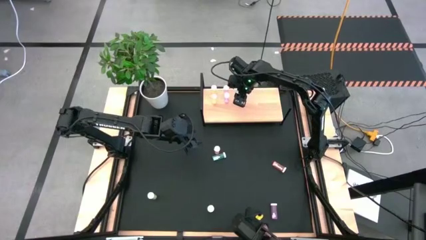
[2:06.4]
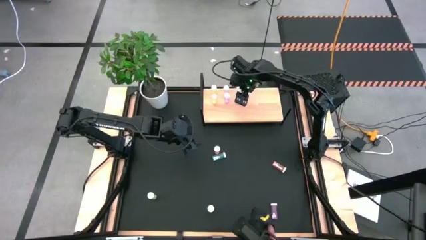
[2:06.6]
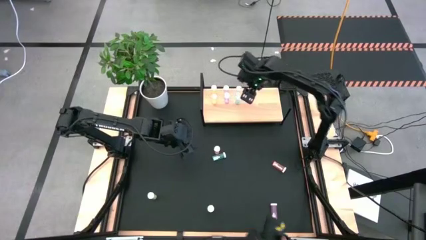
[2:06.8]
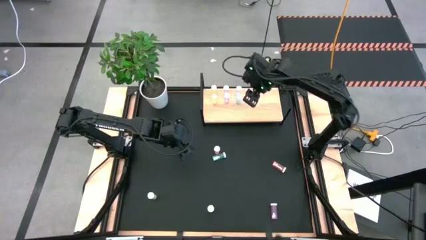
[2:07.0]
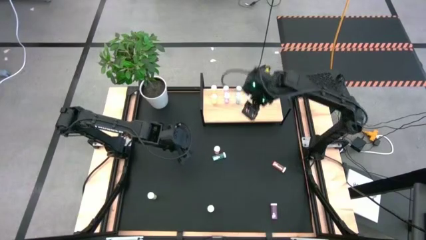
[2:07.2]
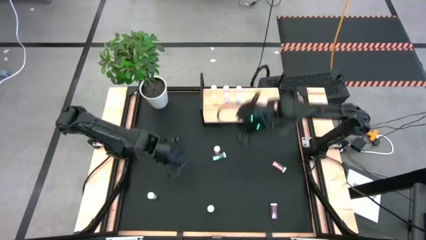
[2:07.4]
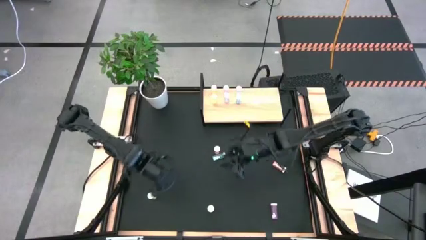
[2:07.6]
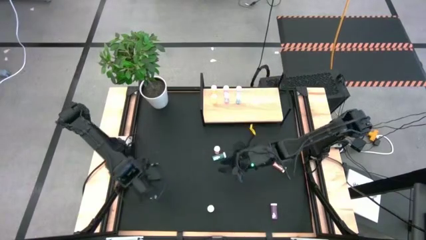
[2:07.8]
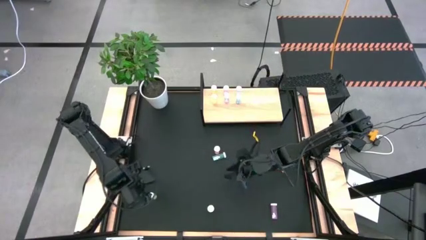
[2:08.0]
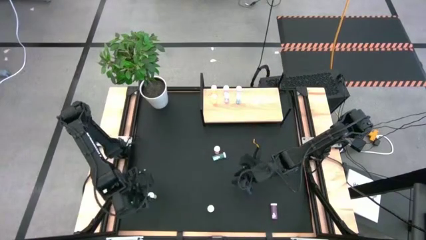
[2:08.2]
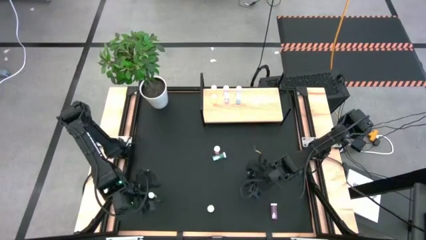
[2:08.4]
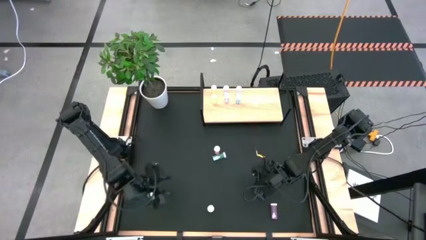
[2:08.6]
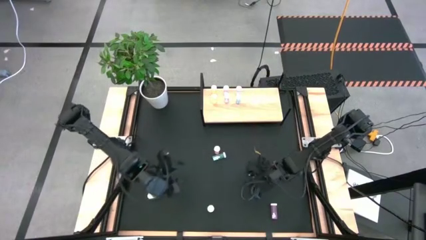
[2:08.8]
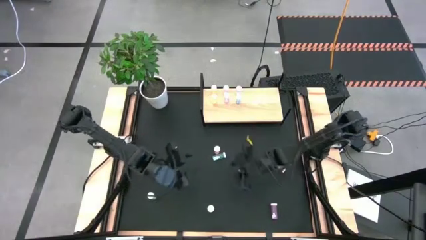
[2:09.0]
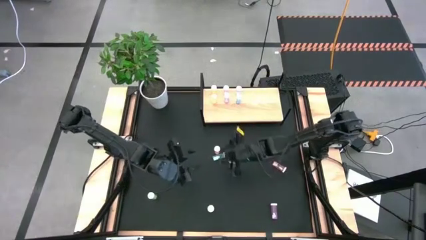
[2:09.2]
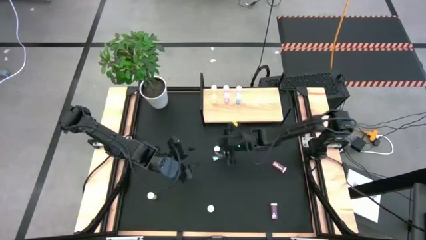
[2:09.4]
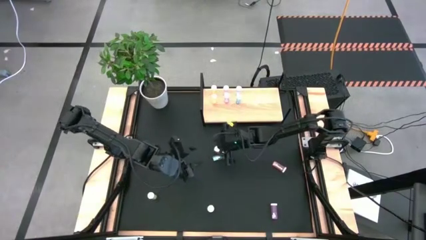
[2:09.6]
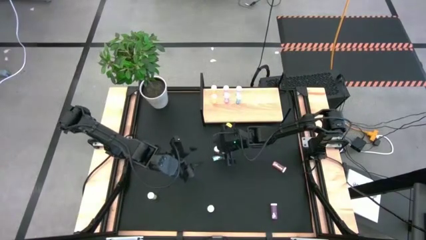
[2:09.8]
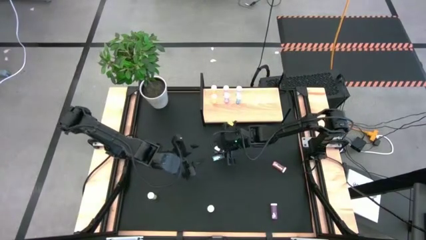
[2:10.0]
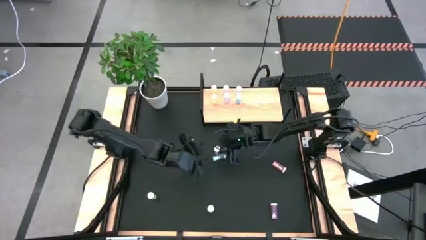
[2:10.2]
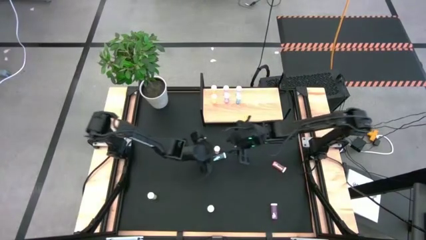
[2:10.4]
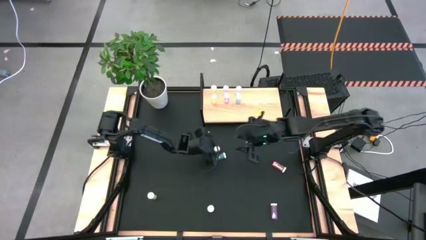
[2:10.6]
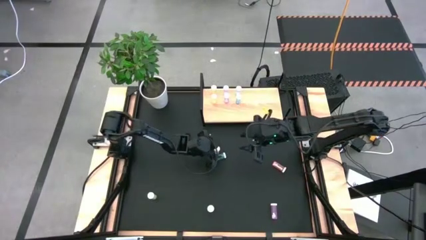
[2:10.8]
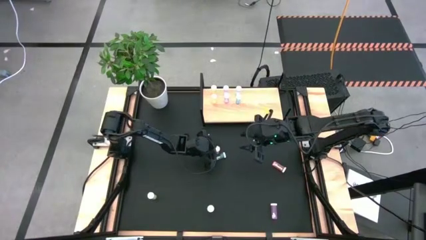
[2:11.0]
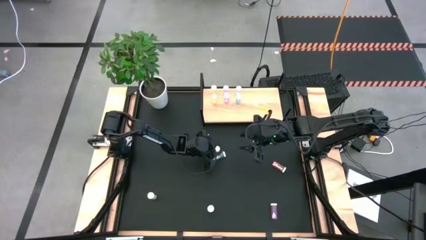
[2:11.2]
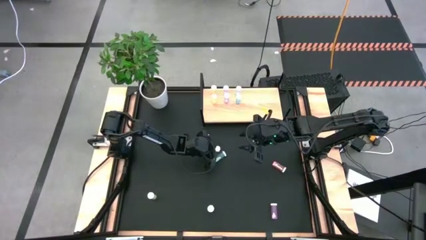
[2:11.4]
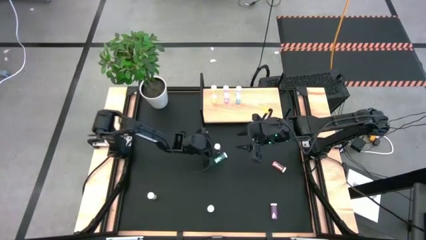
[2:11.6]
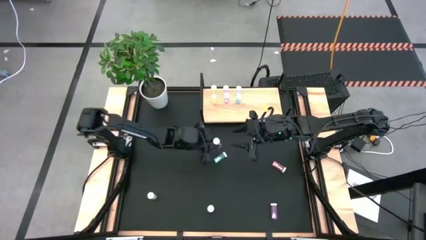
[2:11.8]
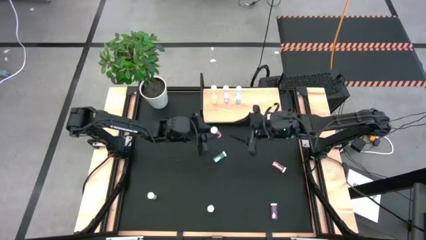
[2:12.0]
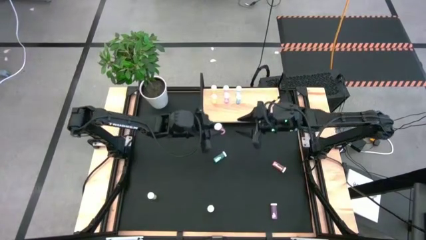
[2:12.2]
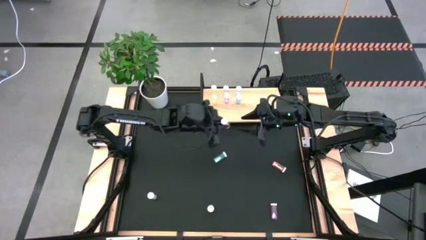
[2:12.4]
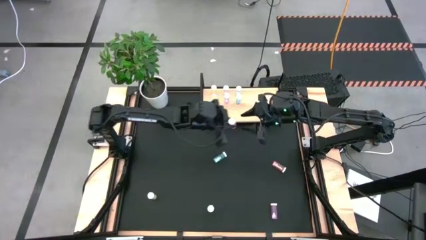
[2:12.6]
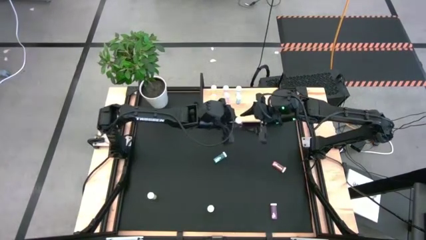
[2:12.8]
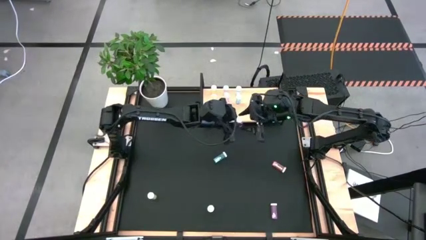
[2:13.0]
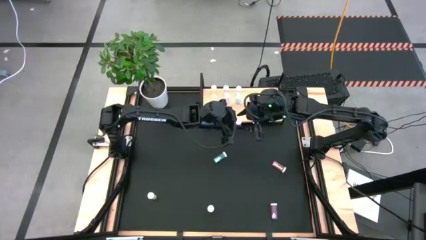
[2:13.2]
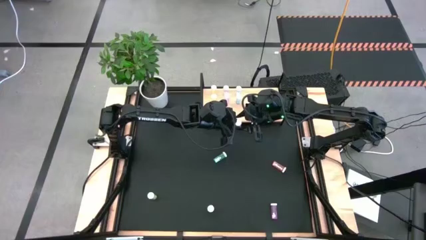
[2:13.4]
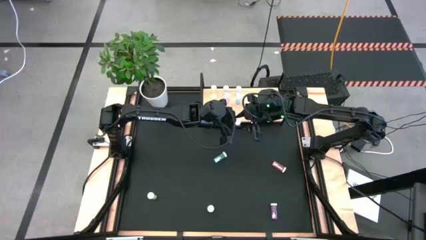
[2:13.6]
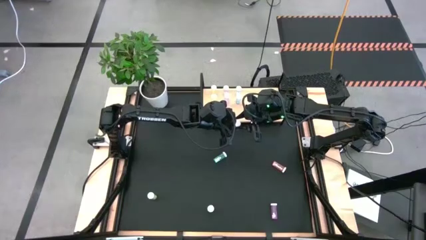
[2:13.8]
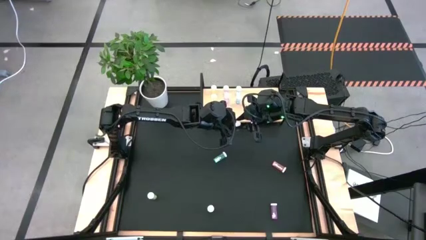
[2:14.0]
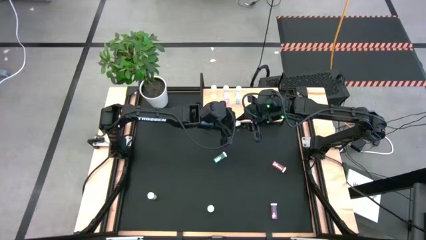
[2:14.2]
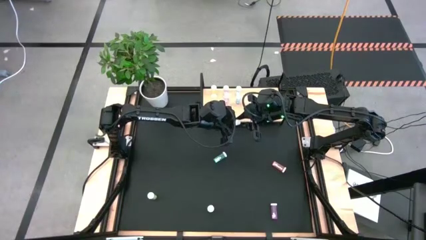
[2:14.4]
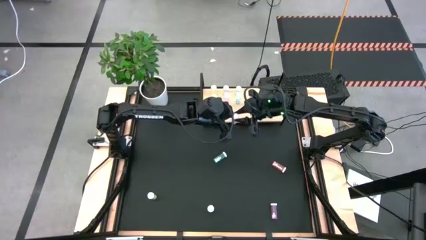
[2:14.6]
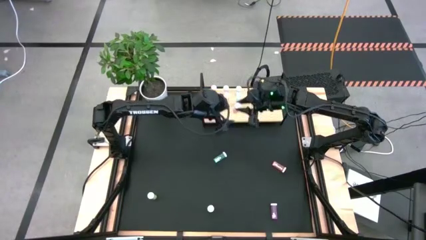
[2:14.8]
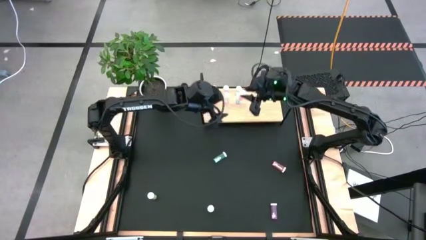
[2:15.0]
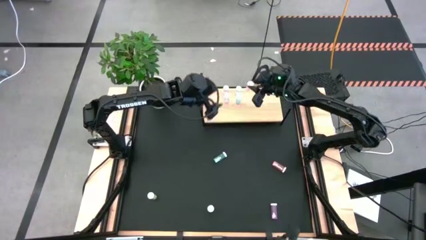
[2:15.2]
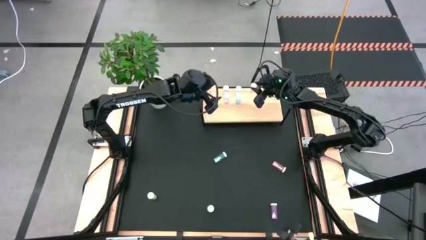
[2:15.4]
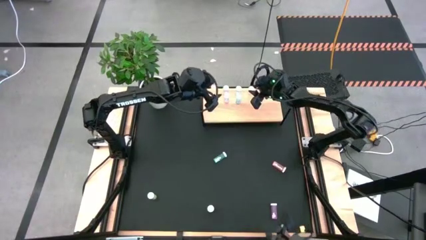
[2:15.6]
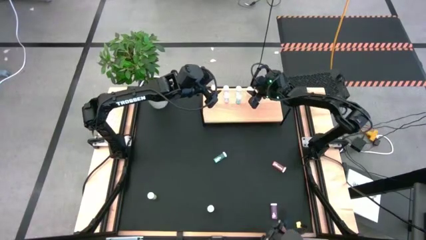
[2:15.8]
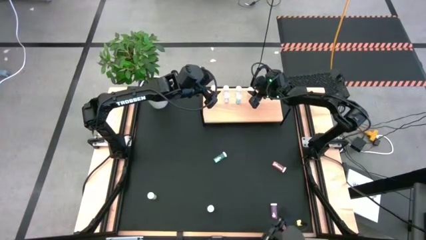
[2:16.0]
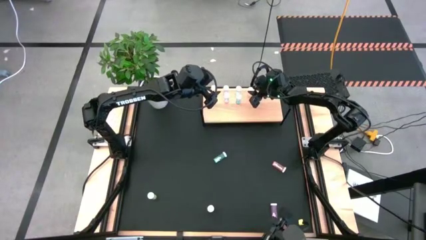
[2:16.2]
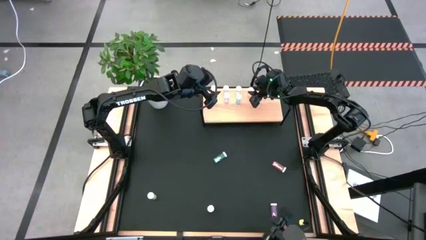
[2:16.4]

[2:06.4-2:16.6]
Task: Pick and place medicine bottles onto shelf by color
Put the top left orange pill bottle on the shelf

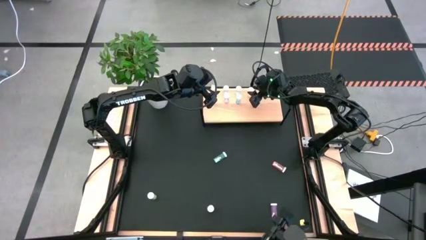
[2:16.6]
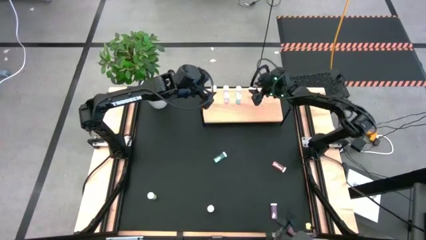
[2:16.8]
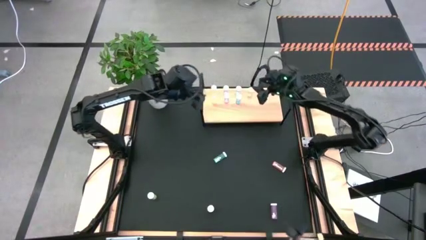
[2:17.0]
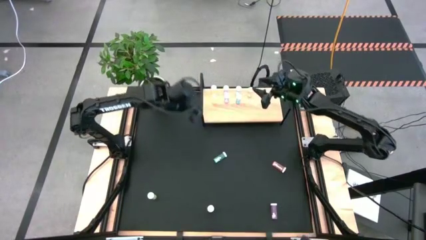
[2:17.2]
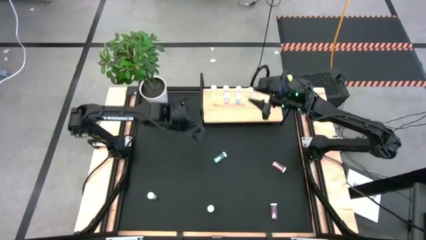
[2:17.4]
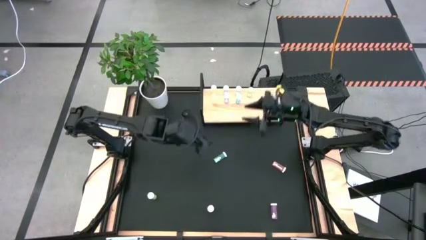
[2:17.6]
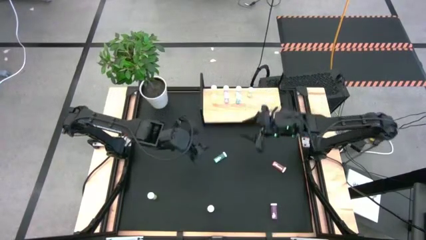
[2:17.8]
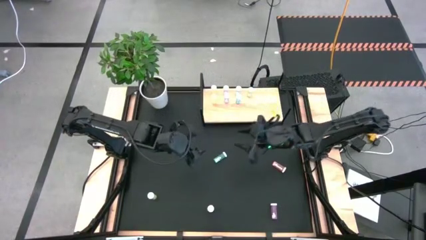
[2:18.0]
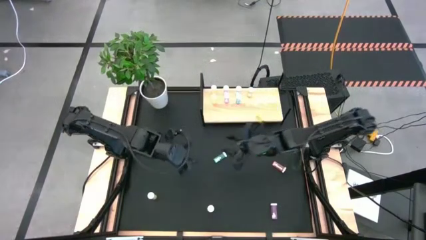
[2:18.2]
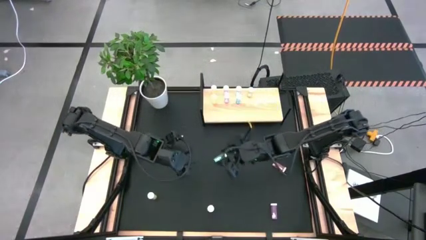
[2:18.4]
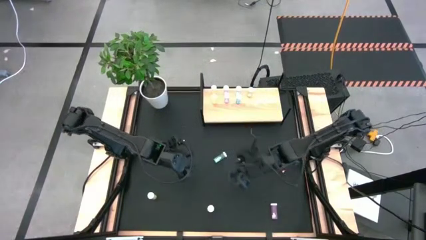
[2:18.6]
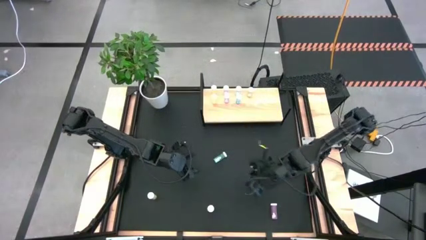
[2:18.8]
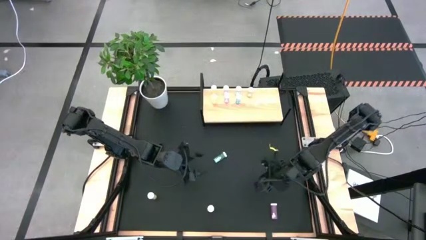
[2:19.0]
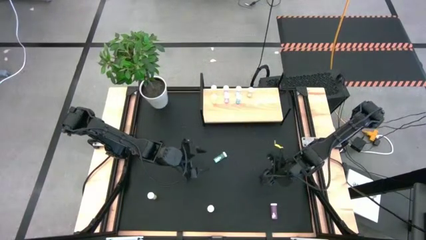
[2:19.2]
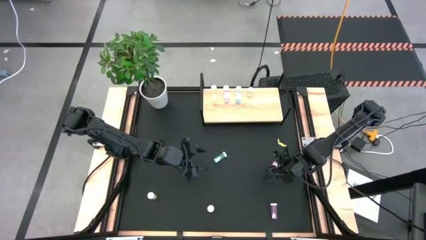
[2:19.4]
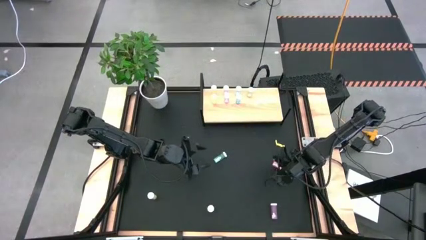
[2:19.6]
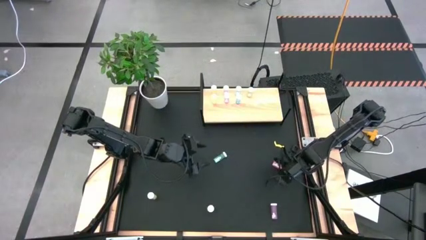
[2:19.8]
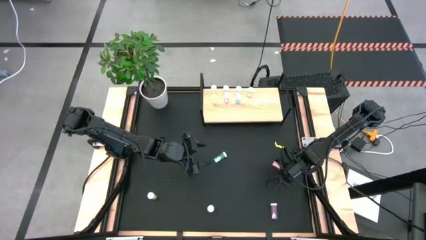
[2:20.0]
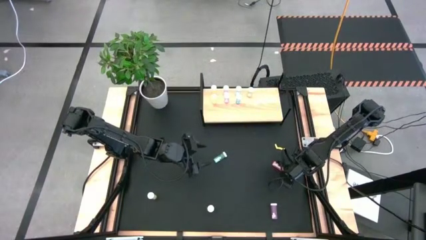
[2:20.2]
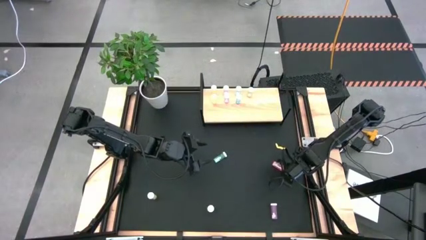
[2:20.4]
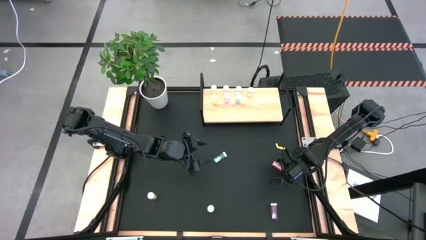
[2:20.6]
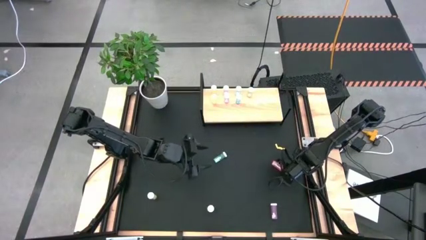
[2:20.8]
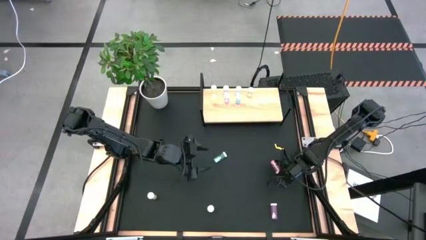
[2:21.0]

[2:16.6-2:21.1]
Put the top orange pill bottle on the shelf aligned with the other orange pill bottle

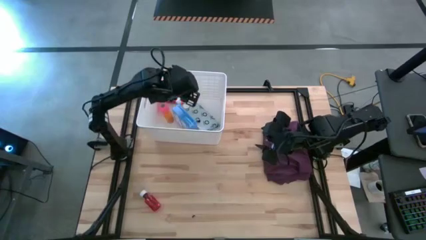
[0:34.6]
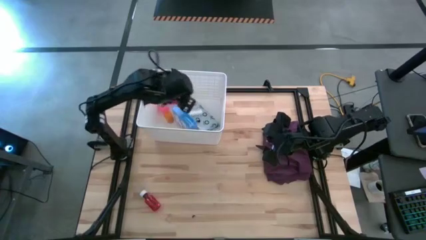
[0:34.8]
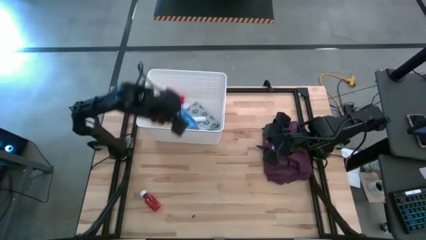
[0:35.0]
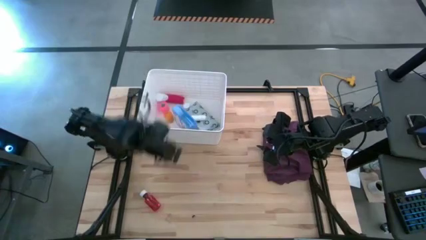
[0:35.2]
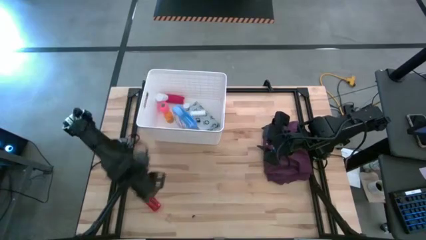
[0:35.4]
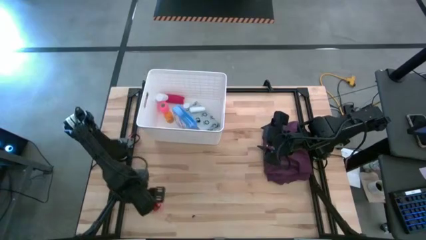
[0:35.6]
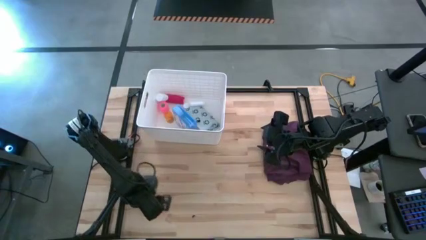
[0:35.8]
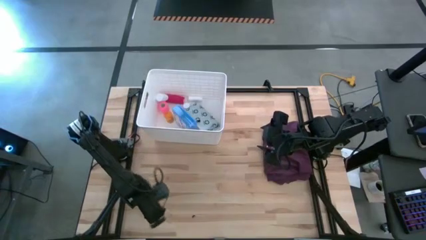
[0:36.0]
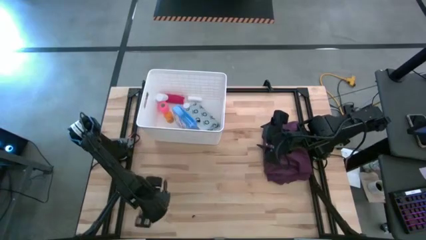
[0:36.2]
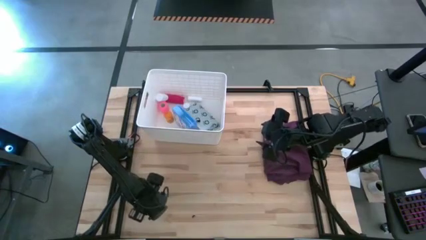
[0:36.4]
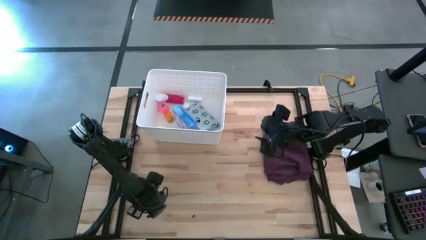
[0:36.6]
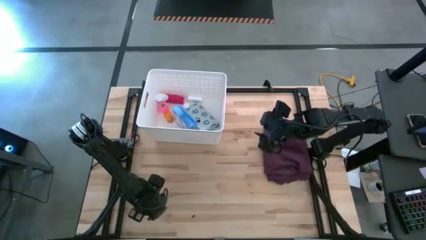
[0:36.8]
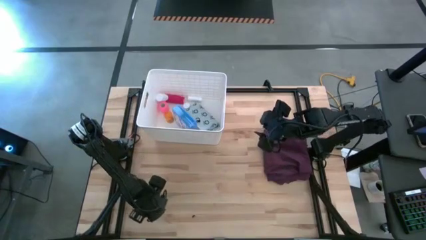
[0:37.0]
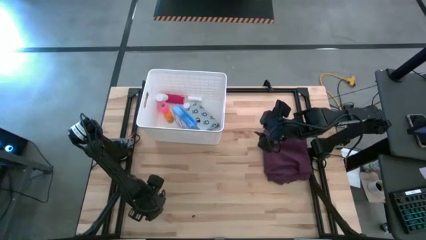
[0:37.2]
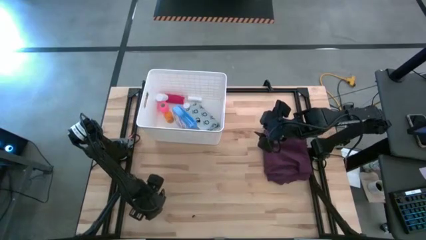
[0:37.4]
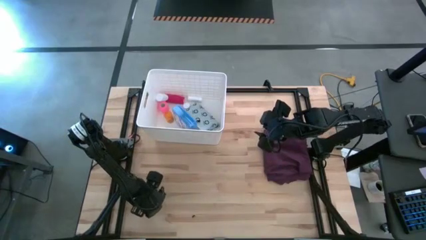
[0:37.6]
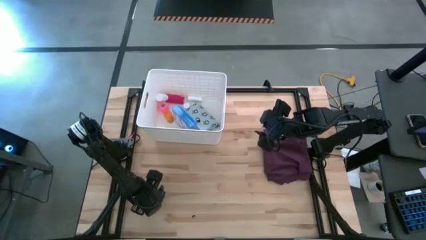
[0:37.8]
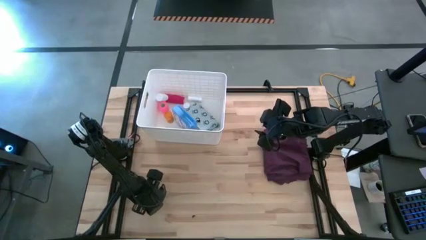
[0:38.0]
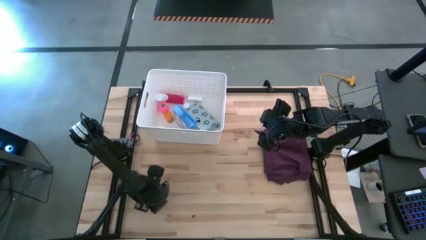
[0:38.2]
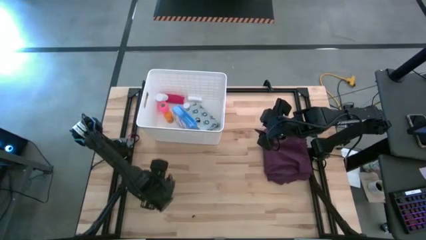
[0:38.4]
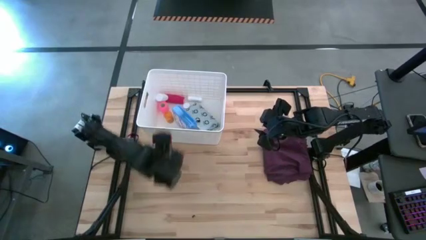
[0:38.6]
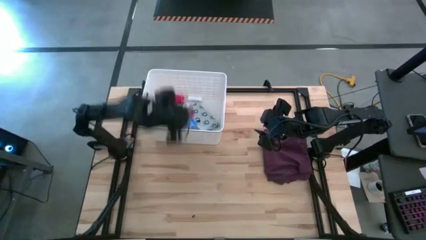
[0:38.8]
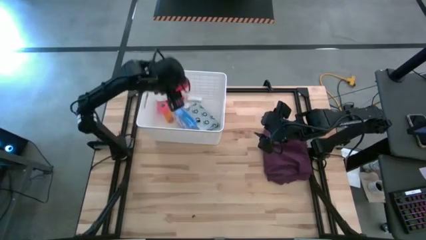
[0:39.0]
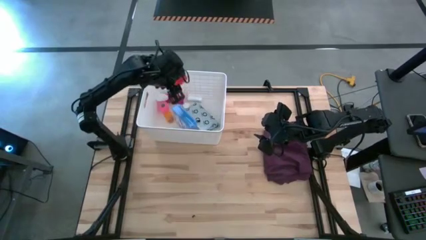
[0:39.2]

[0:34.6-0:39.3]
Task: Pick & place medical supplies in basket/bin
Put the orange bottle into the white bin
